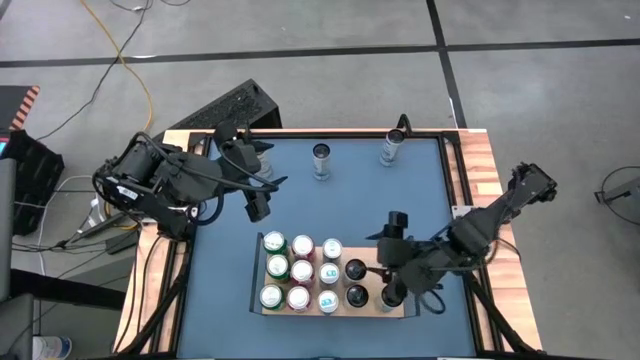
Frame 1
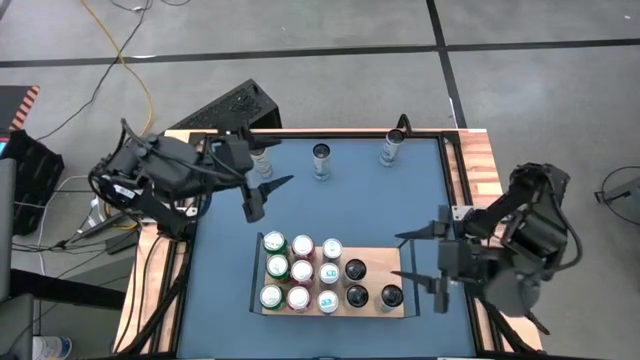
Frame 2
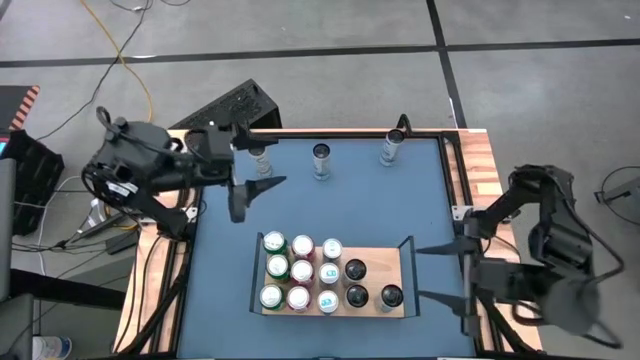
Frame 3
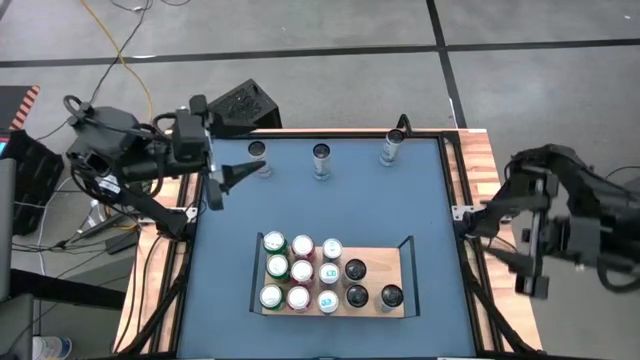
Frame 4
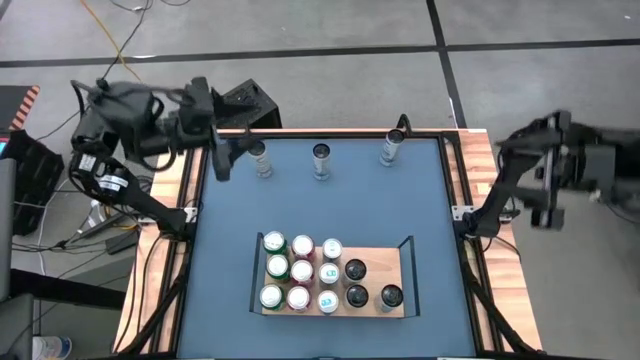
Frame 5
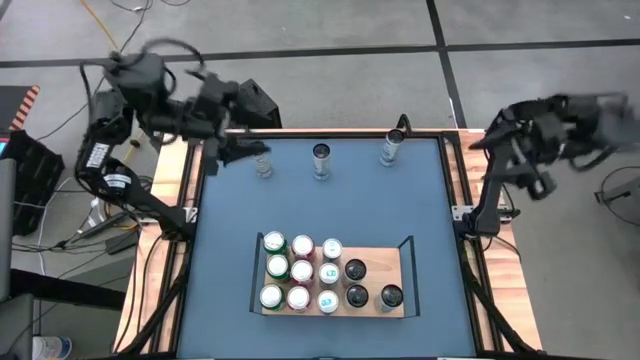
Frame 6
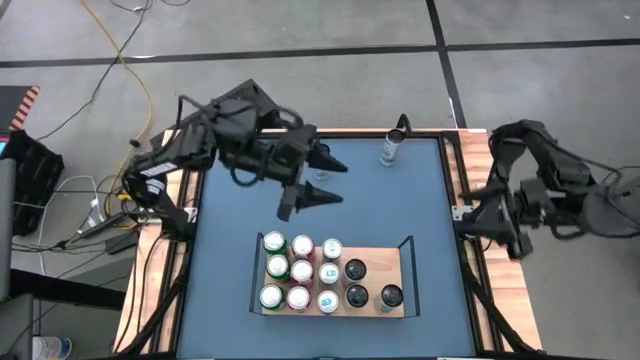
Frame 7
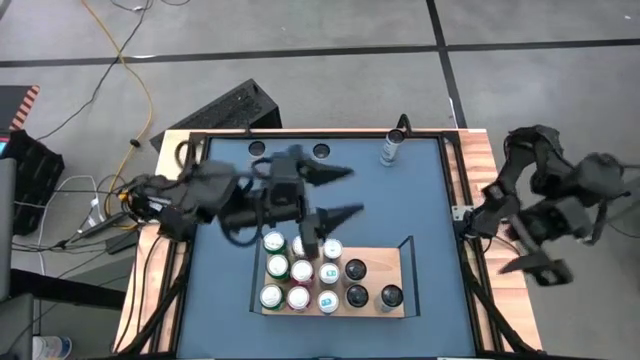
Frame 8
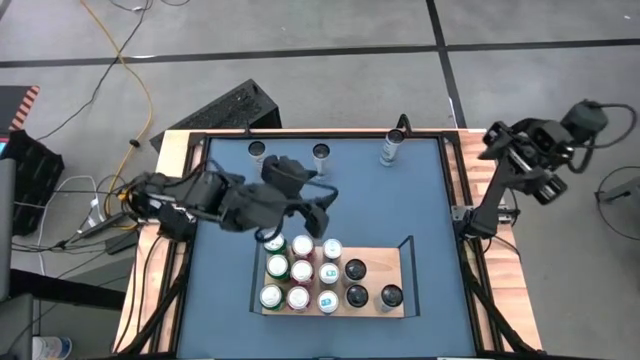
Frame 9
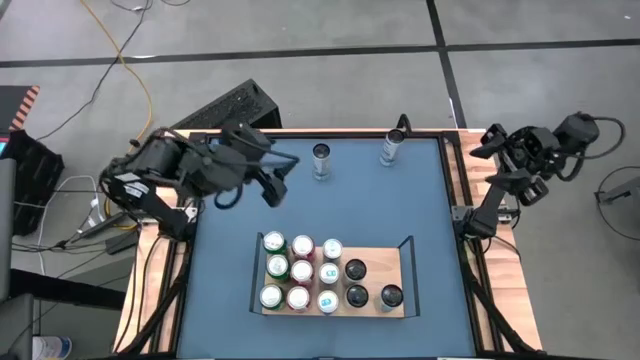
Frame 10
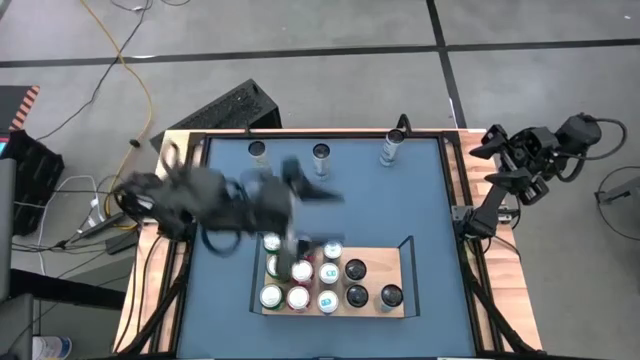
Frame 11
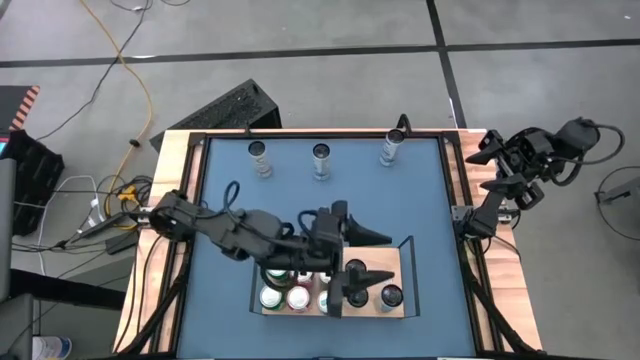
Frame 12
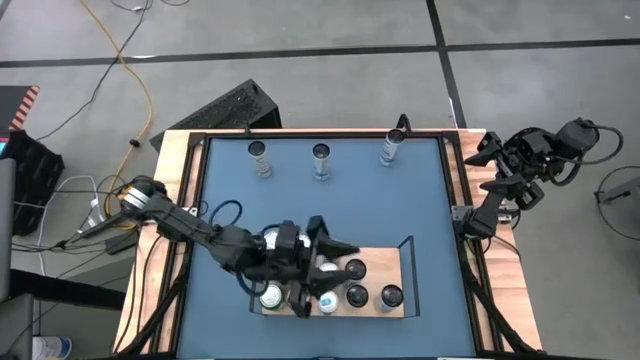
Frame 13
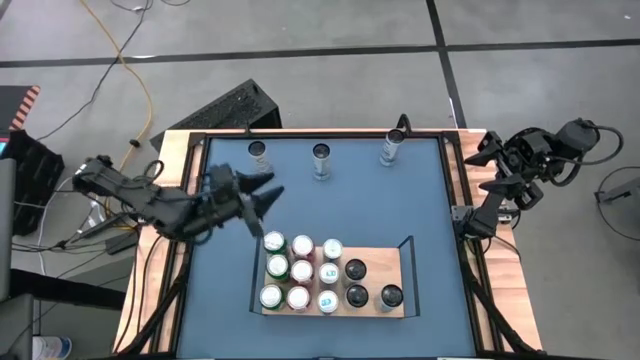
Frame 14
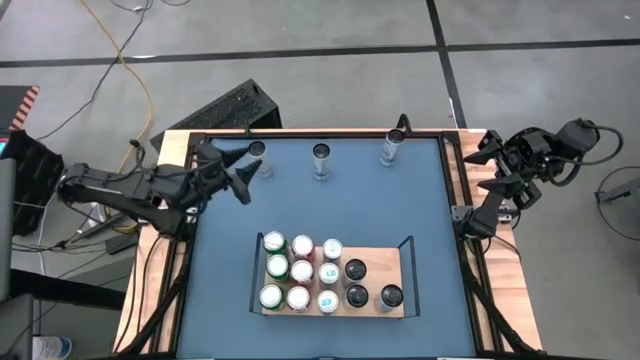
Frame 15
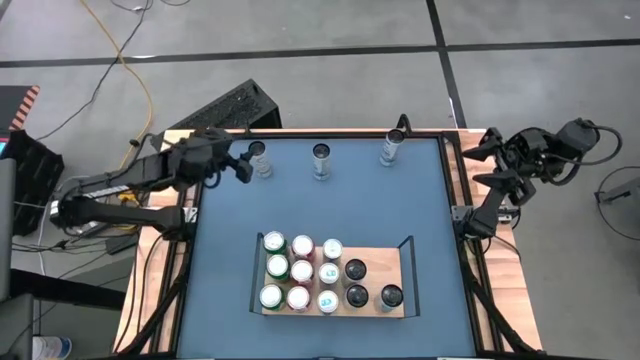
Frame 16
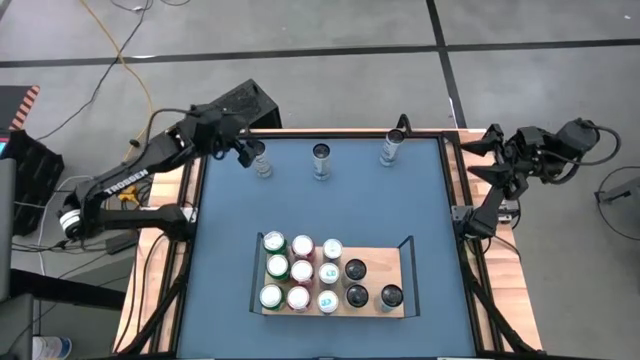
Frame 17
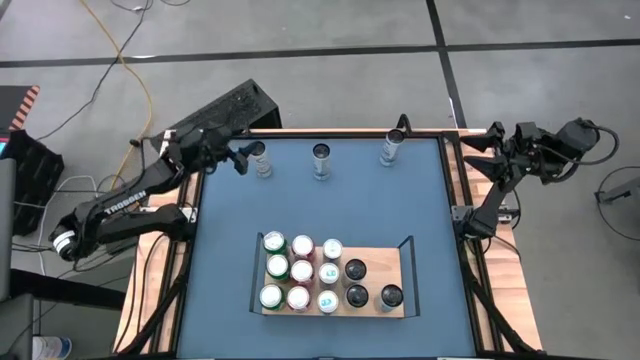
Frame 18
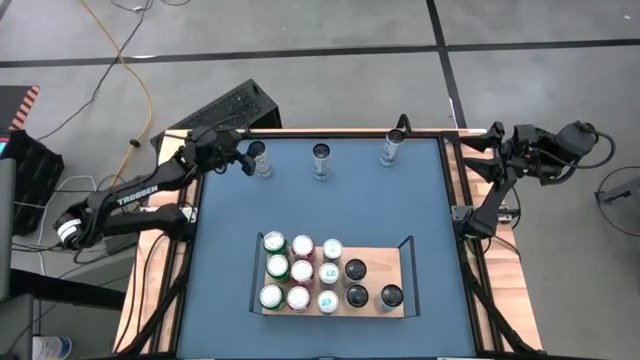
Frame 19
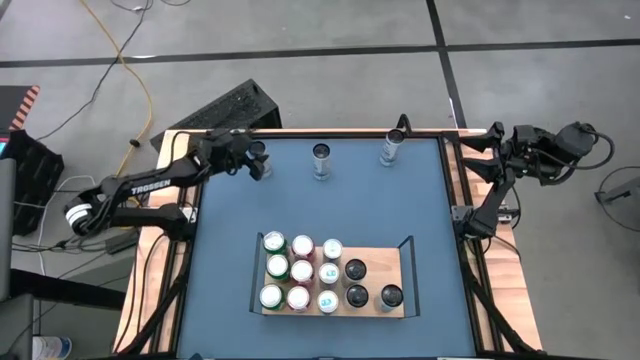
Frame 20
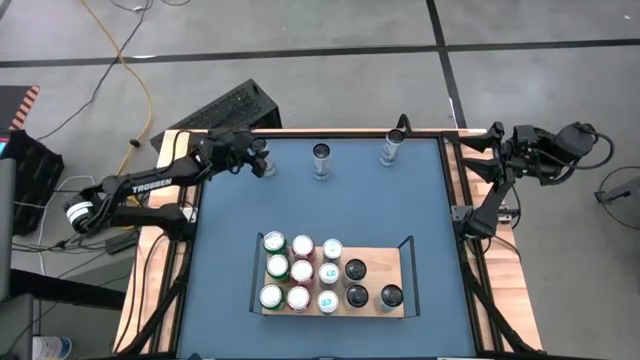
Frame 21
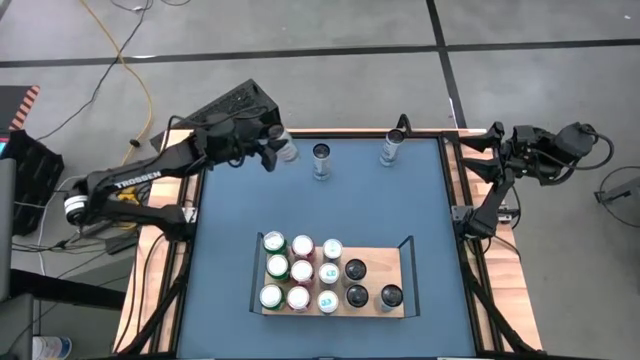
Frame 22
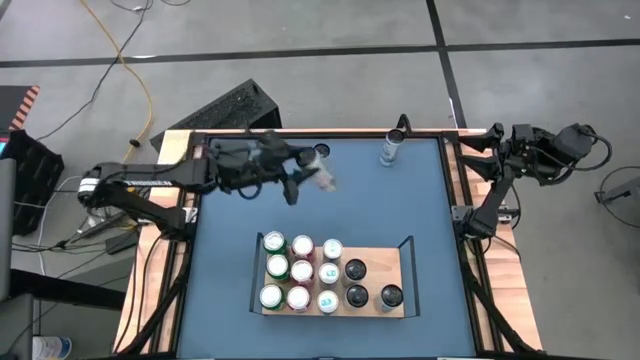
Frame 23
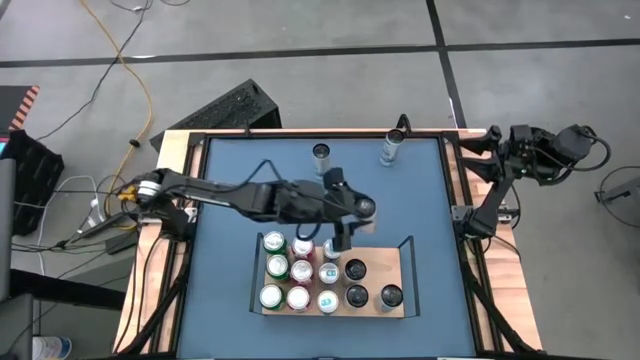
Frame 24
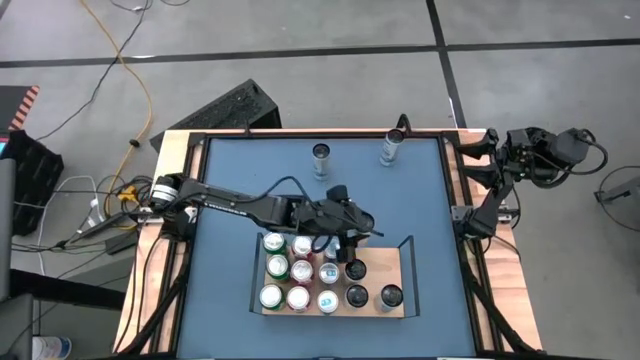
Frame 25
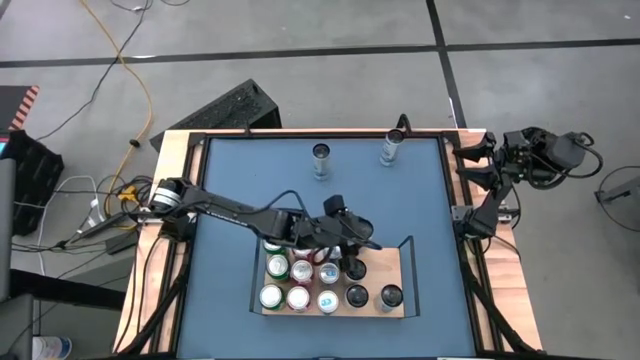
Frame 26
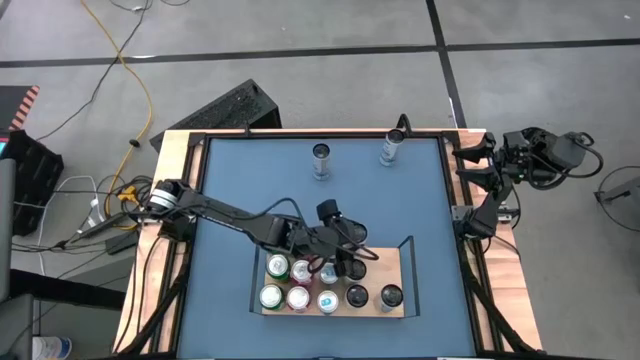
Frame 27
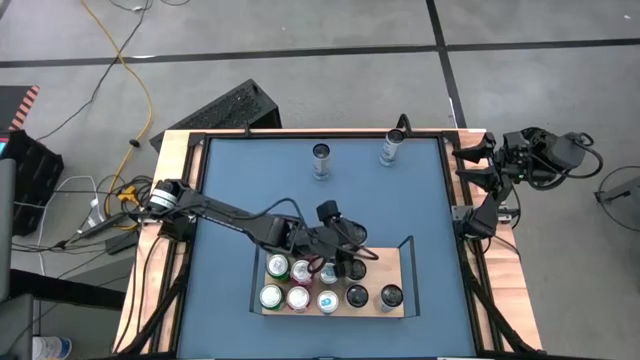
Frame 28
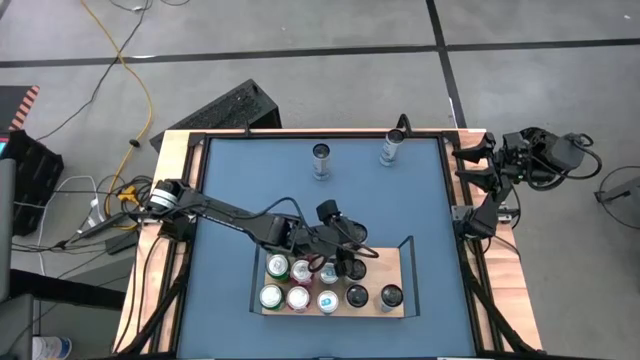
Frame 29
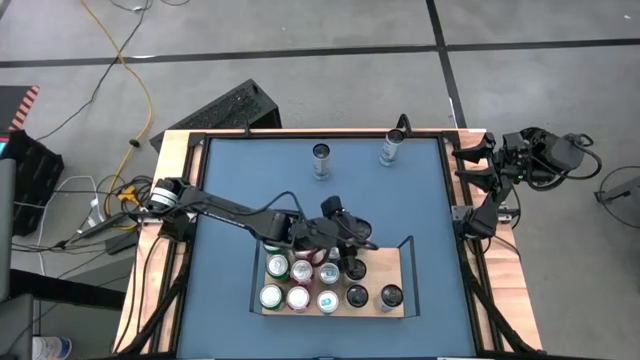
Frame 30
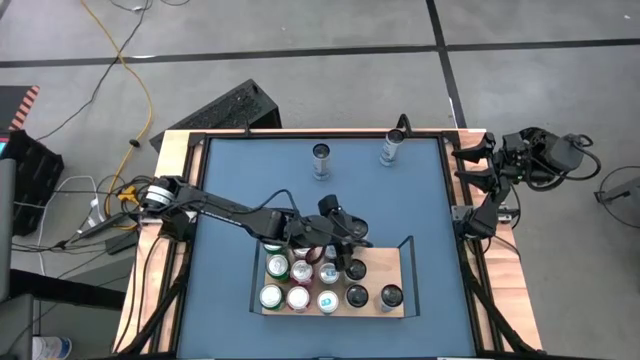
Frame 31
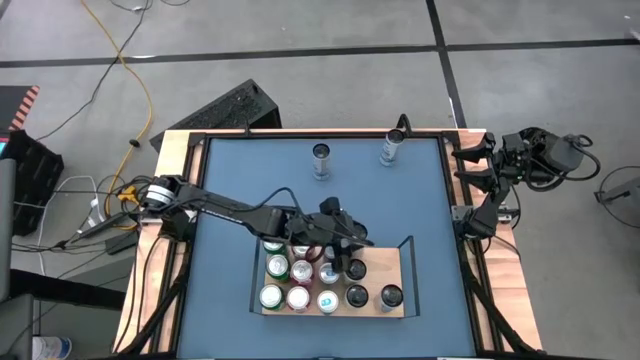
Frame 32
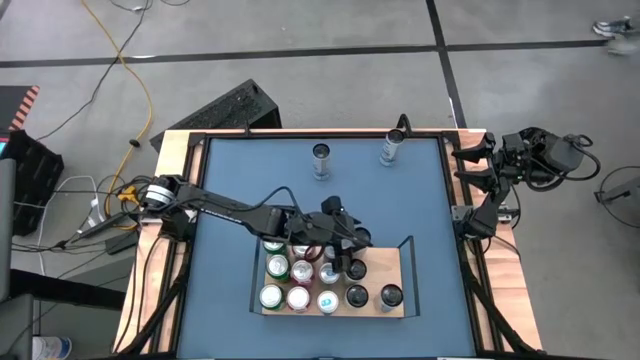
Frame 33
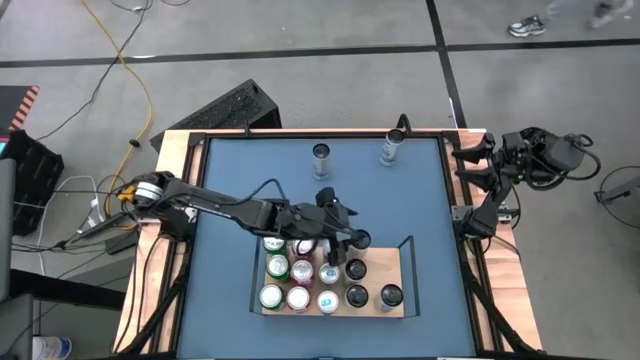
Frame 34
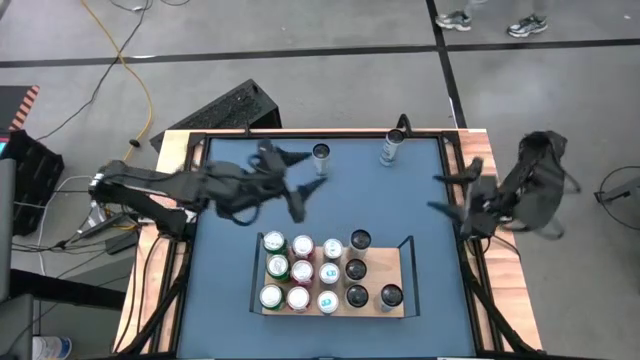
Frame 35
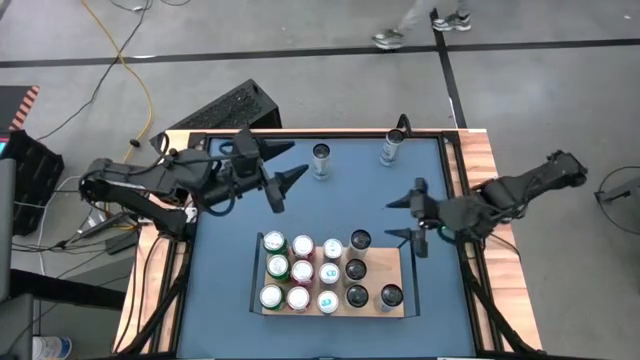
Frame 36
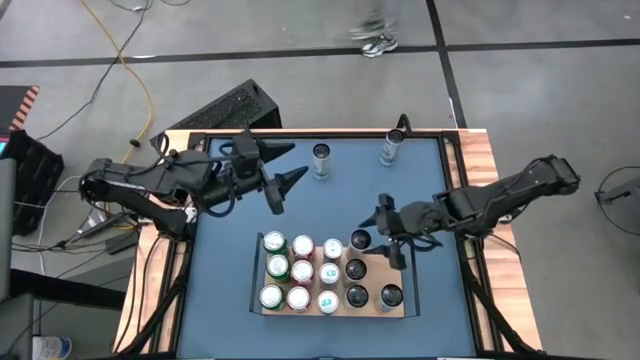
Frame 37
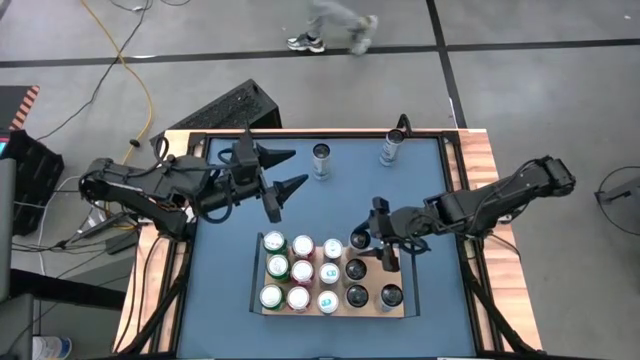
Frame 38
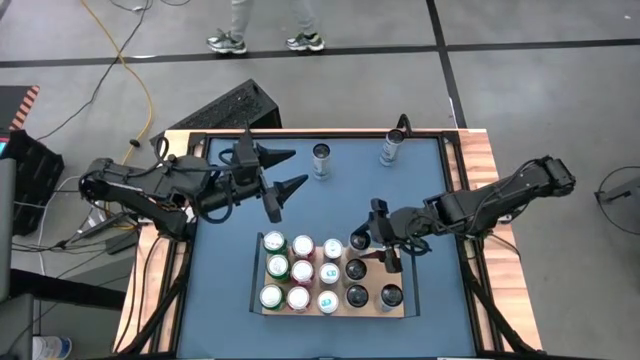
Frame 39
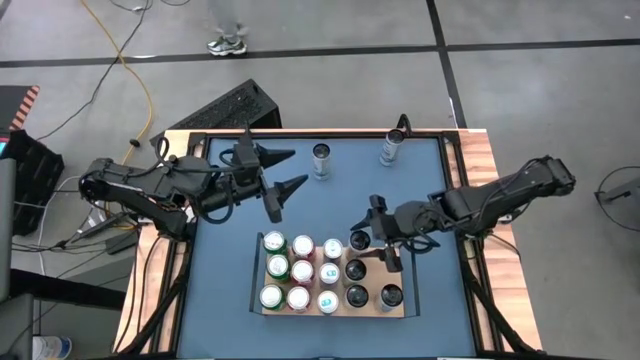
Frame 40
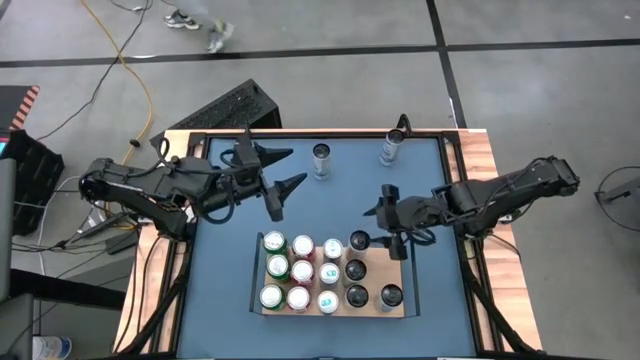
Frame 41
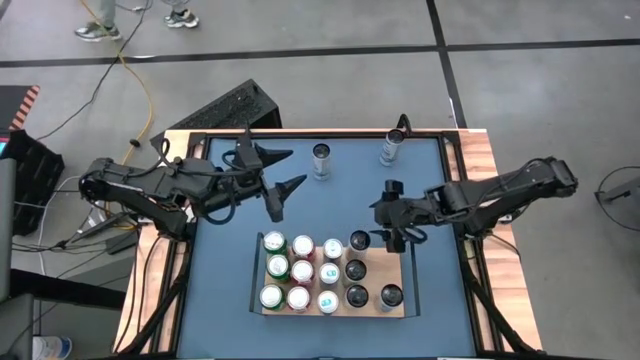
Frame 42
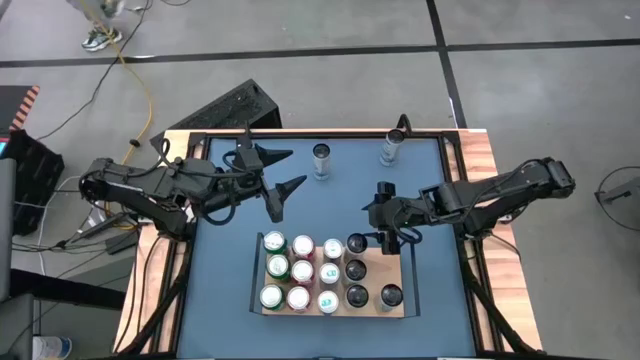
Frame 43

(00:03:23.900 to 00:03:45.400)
Task: Place canned beverage on shelf
Put the white-yellow soda can on the shelf aligned with the other white-yellow soda cans

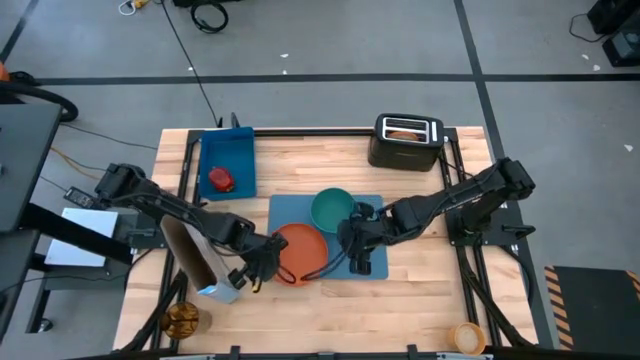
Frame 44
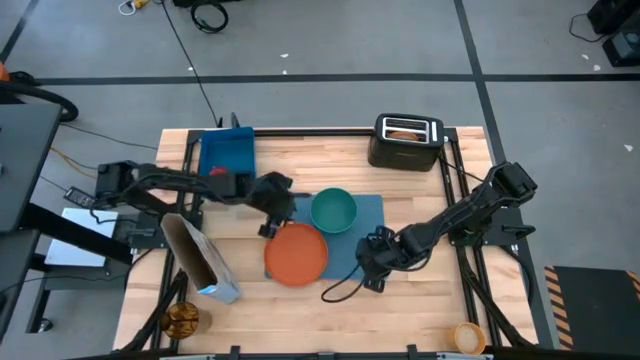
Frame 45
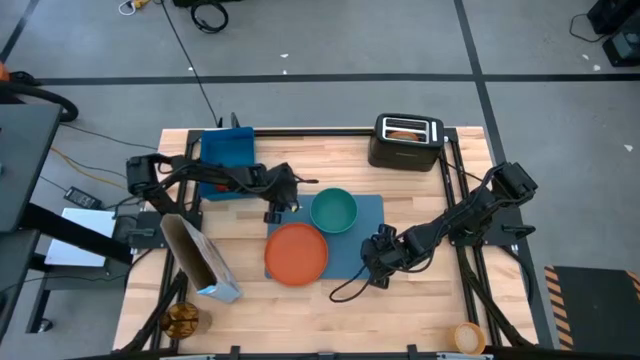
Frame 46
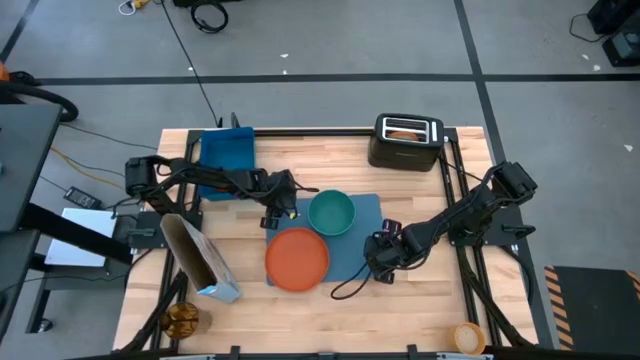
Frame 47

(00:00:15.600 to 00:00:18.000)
Task: Arrange a breakfast setting
Adjust the blue table mat
